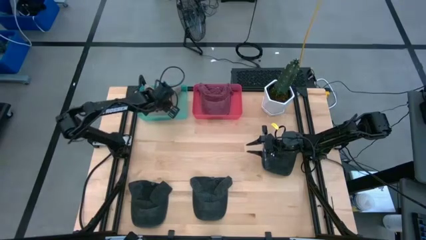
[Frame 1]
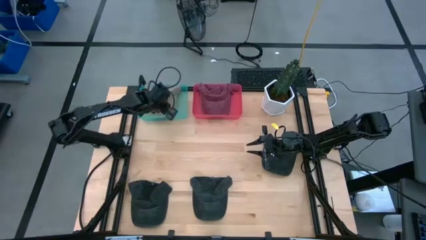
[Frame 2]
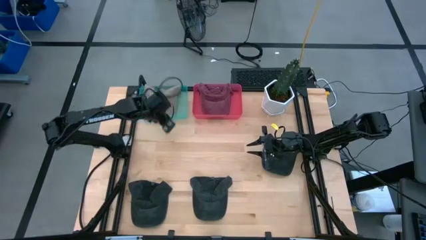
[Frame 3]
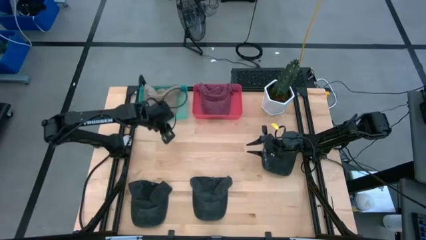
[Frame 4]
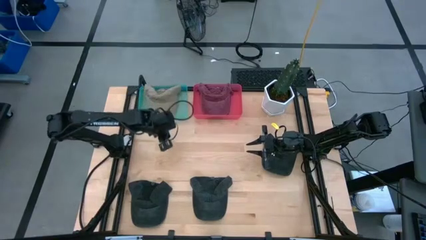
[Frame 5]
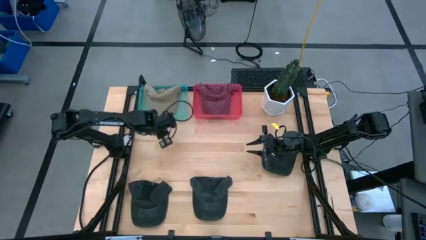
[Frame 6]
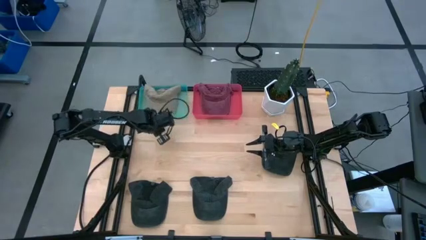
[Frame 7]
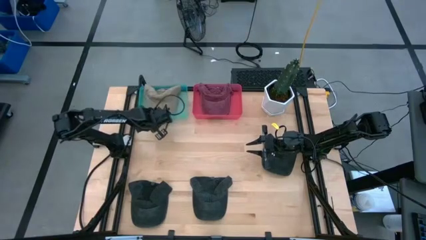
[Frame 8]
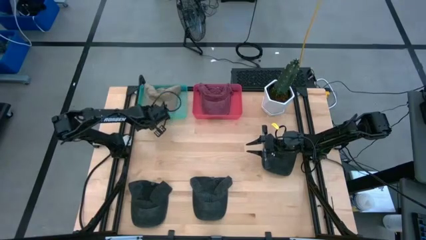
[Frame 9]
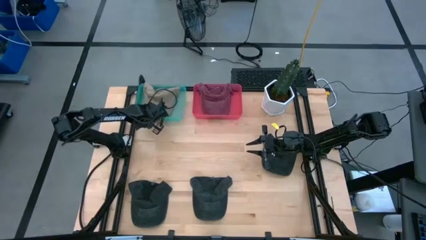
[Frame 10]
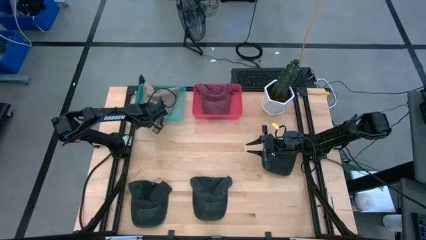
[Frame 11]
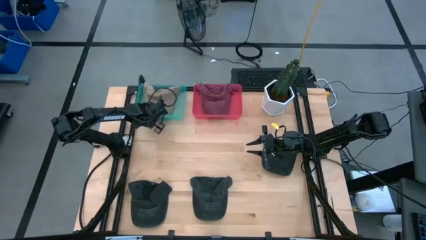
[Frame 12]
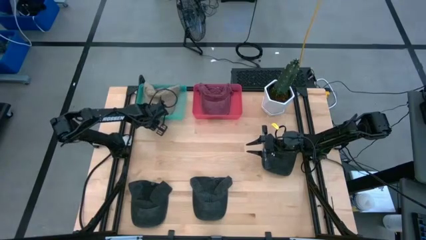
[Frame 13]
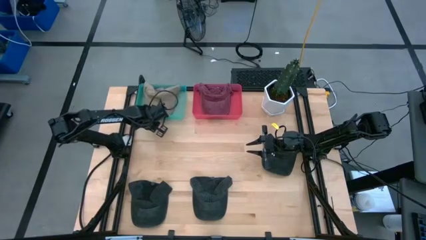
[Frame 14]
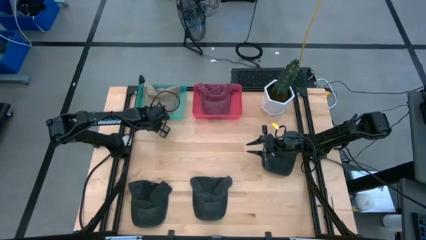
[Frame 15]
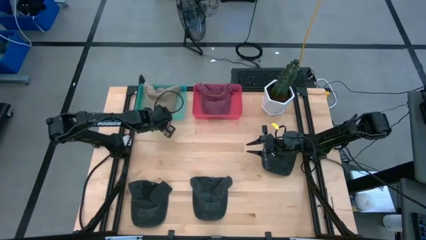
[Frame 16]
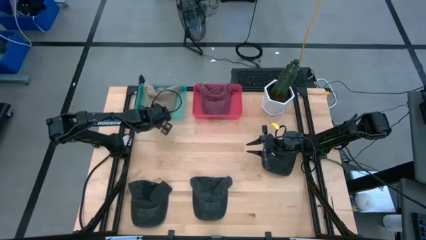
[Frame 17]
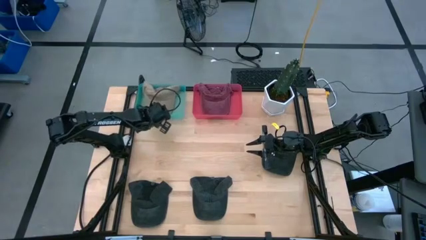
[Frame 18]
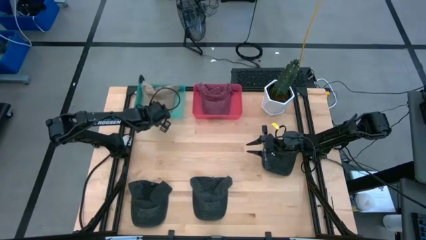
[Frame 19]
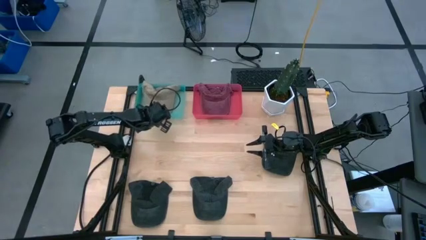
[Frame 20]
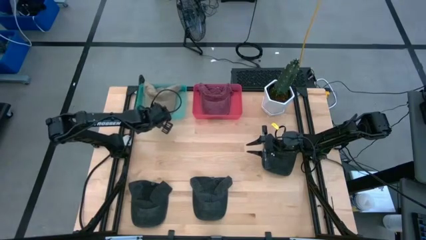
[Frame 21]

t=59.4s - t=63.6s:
Task: Pick & Place hat
Adjust the blue bin on the table

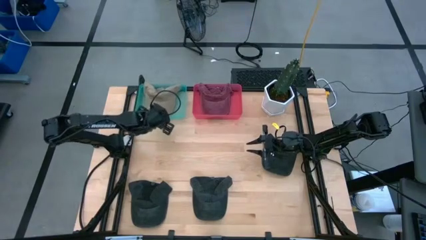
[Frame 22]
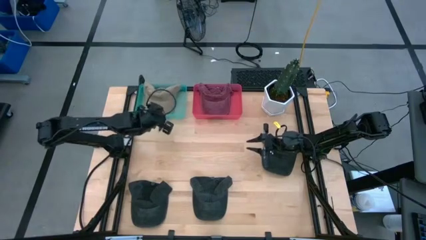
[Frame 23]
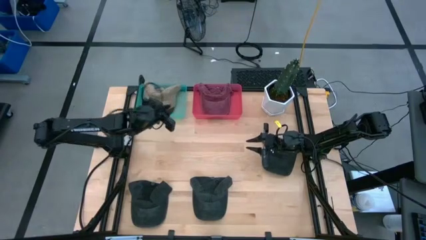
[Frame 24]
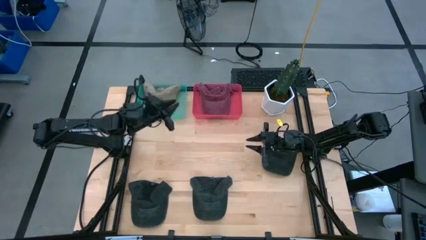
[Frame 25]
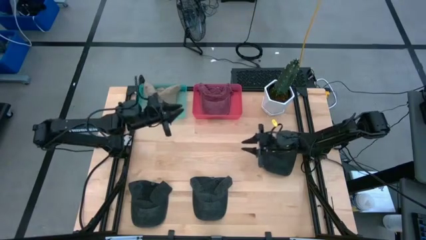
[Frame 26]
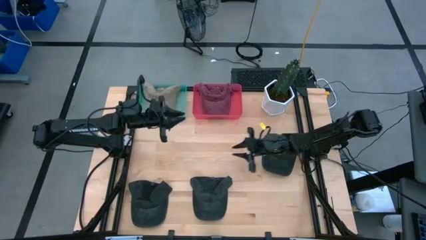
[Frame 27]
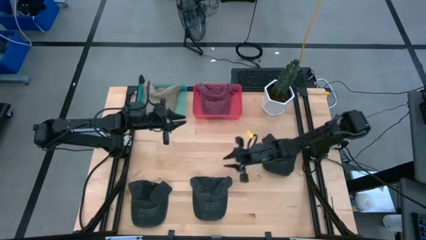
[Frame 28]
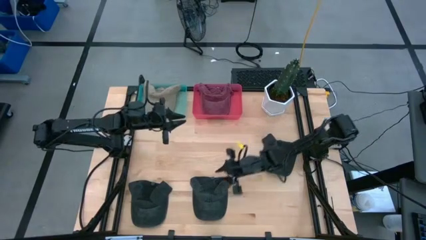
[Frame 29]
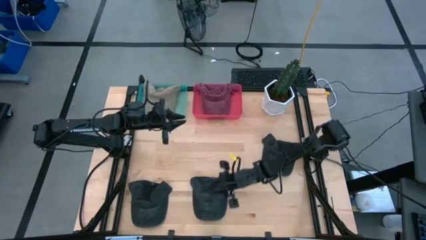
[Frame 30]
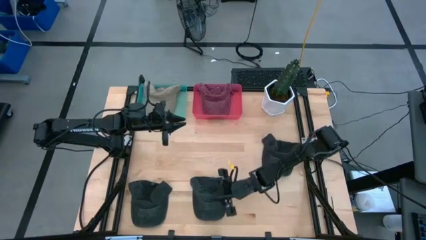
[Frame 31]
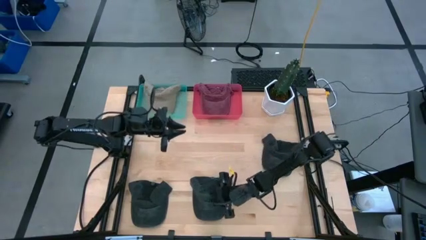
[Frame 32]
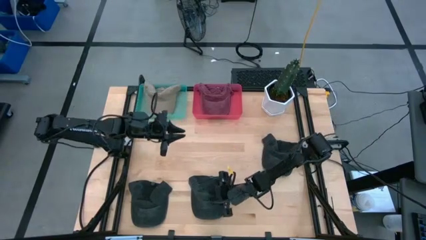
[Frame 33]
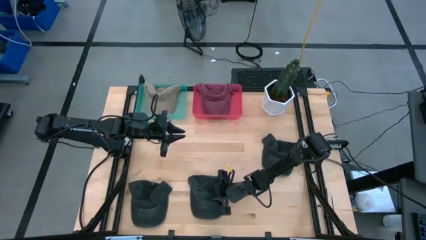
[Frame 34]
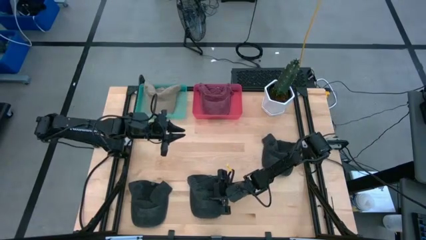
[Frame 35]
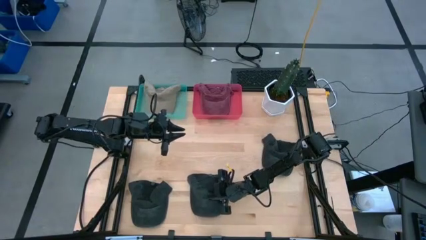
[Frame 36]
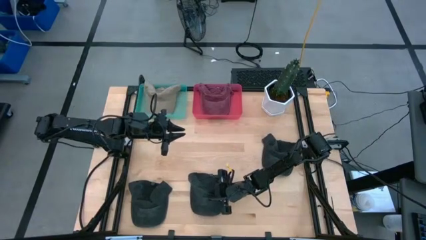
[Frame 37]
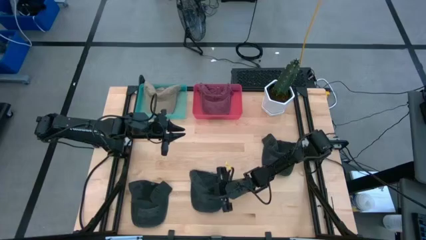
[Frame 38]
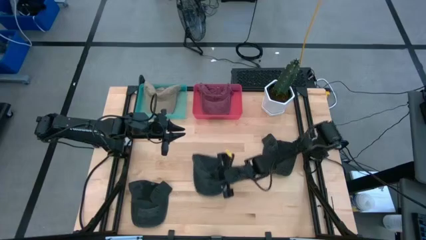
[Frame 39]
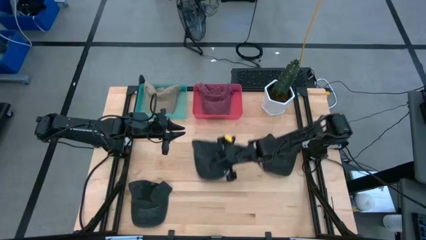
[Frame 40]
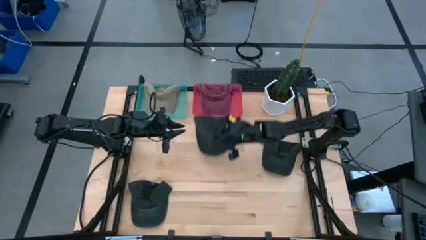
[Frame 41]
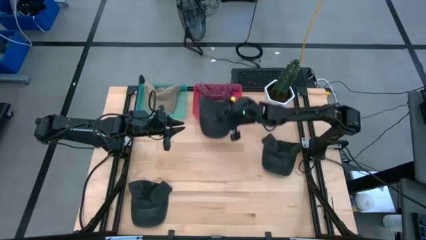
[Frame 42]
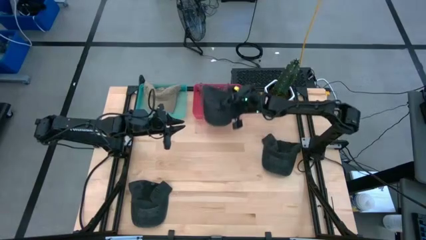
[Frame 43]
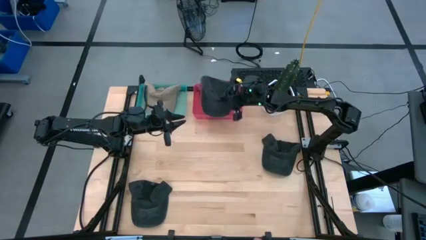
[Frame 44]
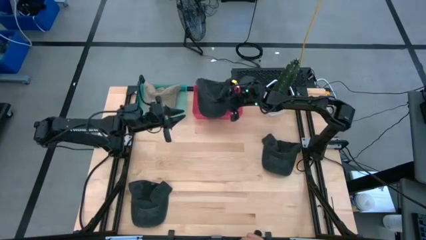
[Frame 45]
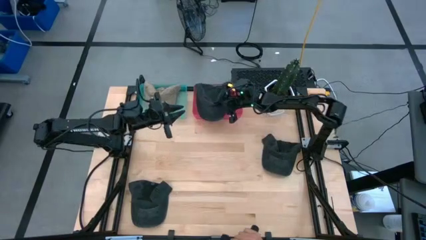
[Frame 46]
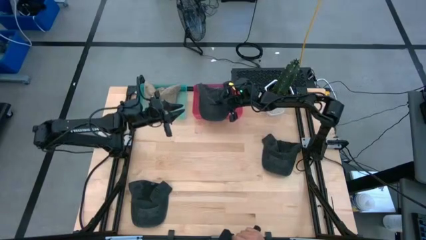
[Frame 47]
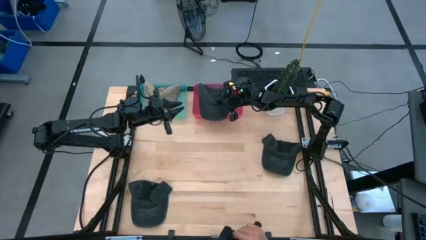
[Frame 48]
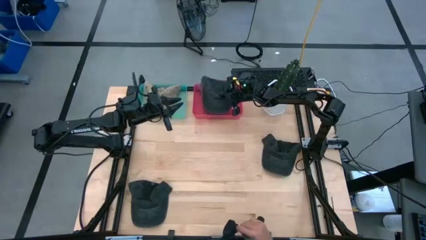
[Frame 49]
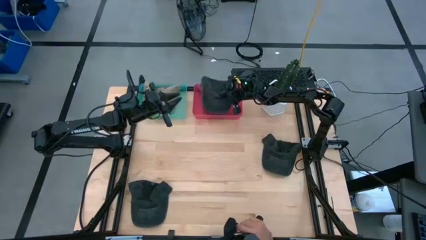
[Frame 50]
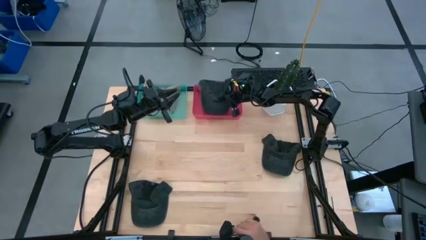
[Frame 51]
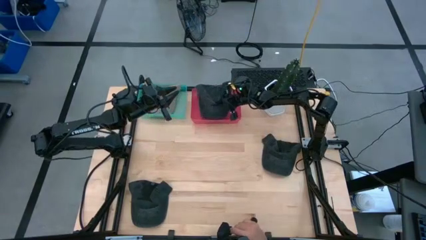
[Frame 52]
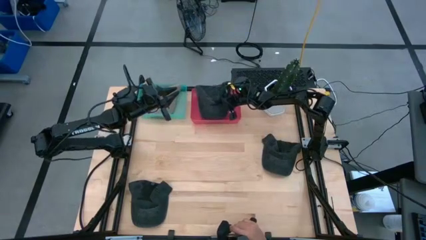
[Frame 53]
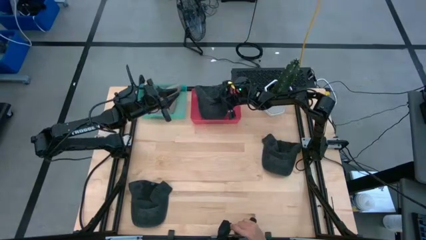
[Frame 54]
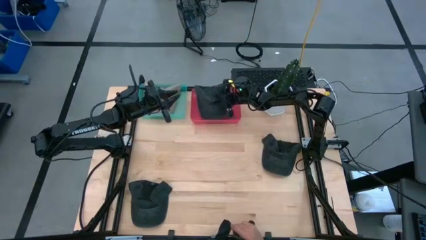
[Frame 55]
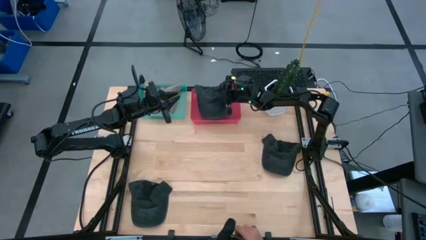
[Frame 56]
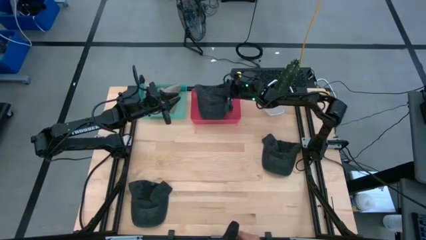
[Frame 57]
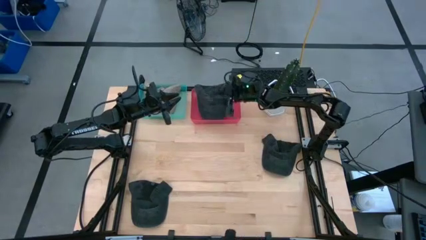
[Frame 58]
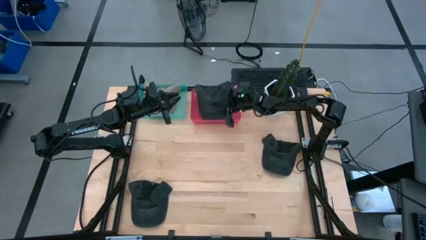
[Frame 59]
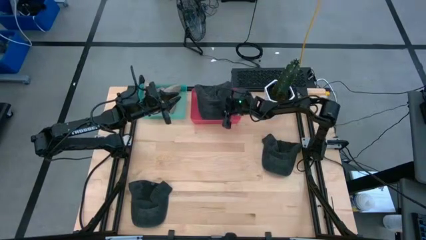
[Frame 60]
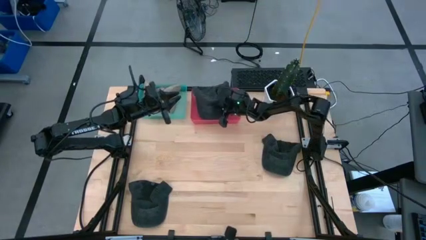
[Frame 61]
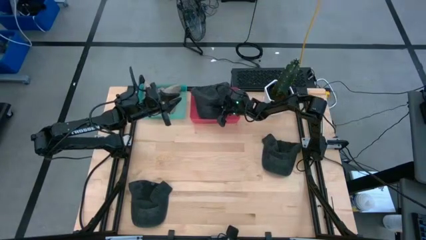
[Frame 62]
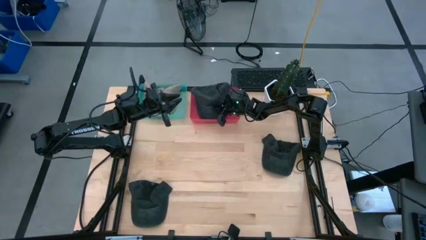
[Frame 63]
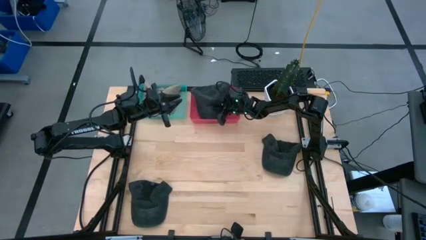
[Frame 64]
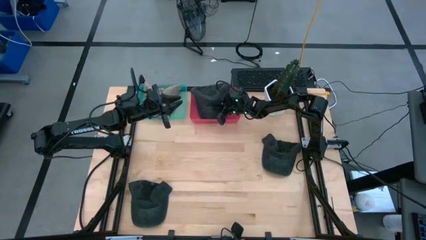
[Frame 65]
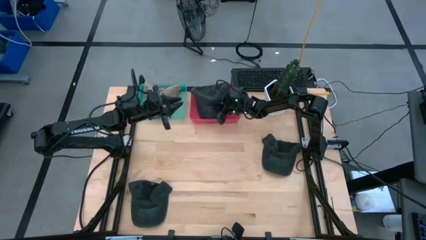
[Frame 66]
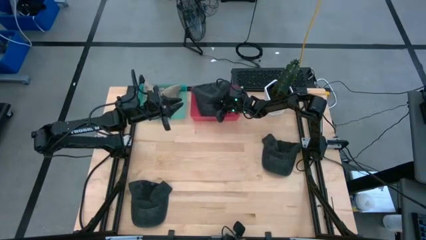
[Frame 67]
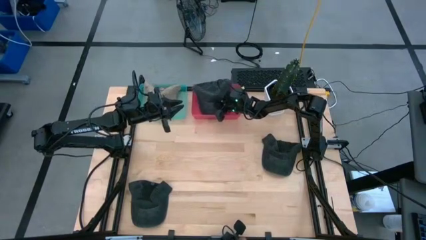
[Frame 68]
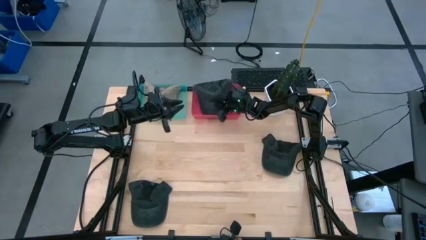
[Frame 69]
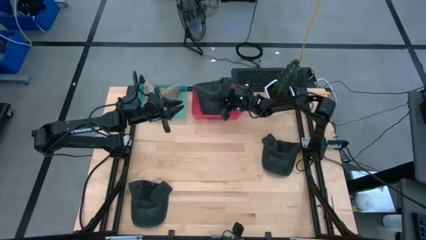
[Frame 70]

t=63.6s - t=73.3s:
Put the bottom right black cap into the red bin
